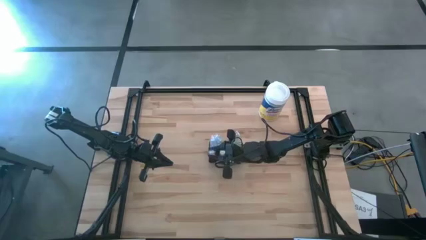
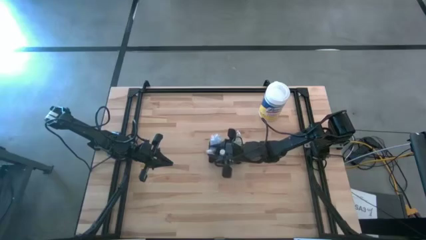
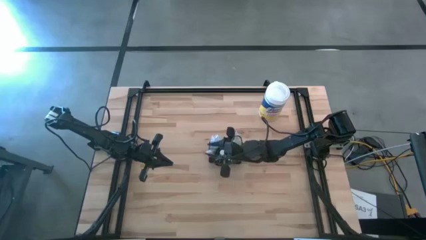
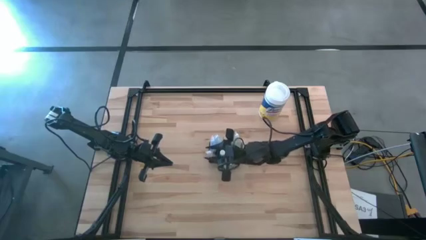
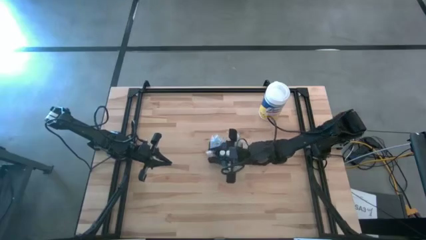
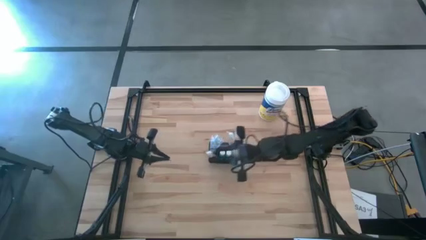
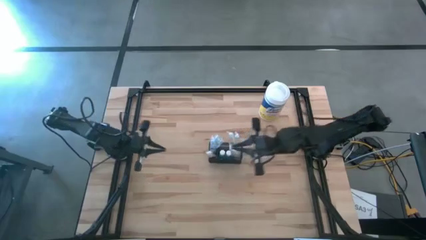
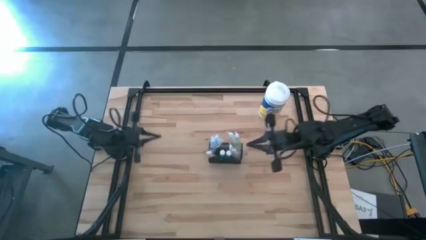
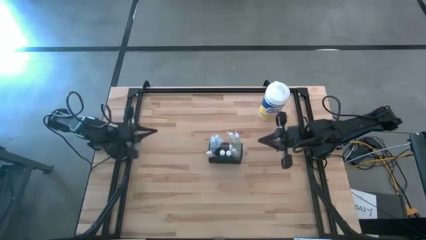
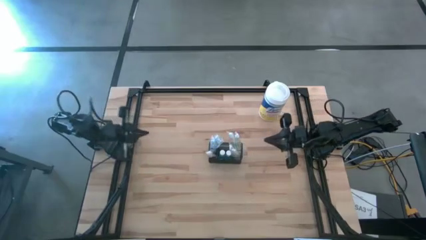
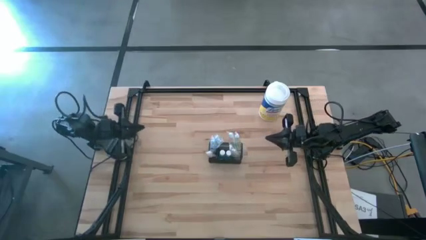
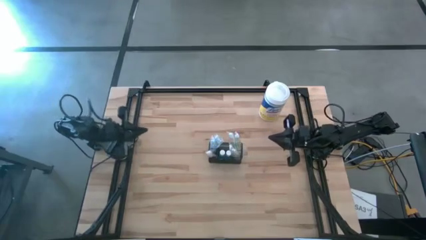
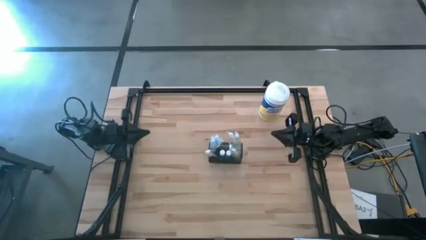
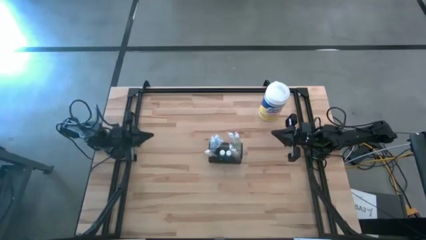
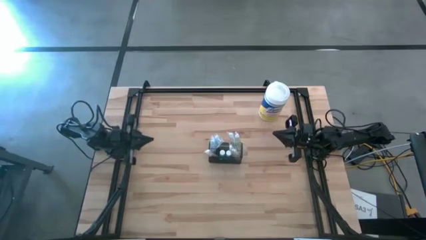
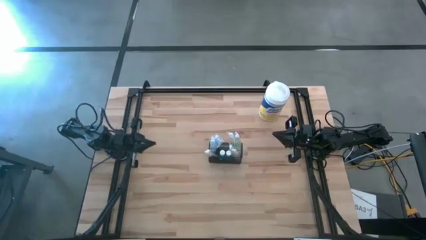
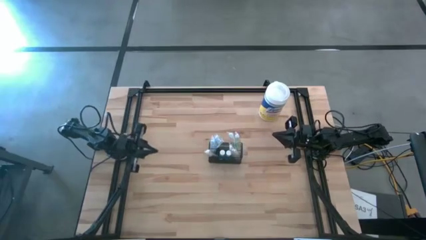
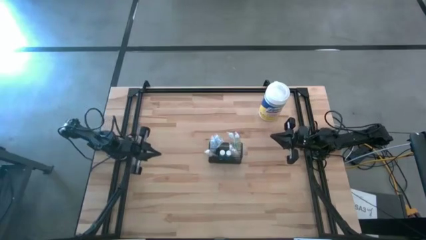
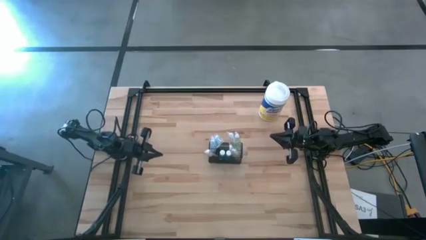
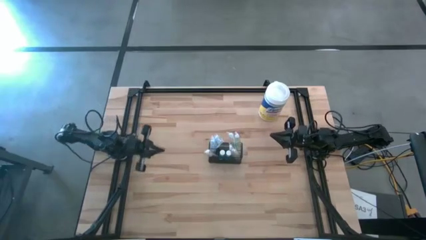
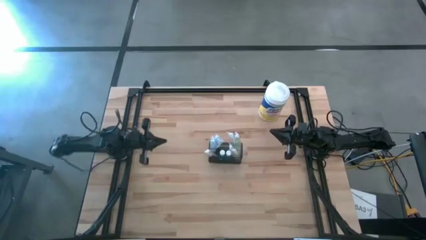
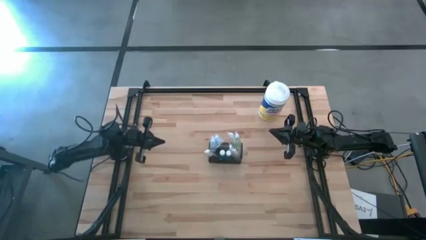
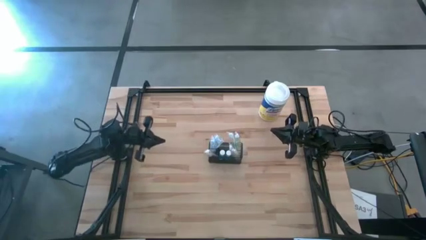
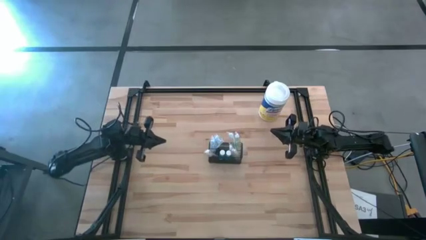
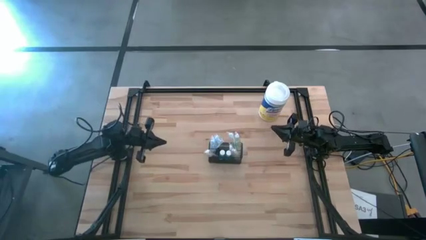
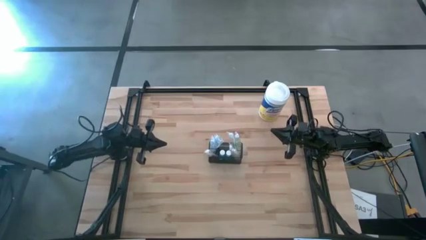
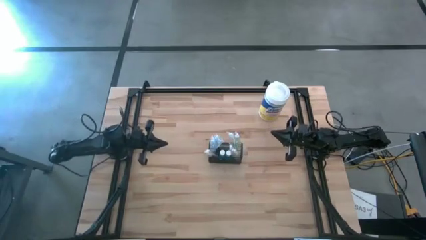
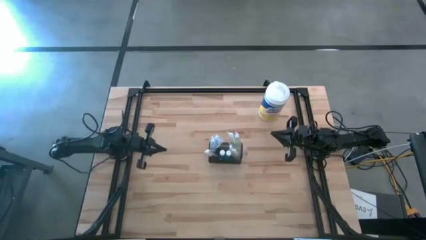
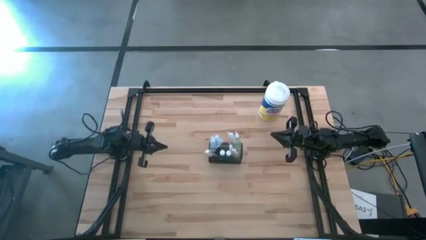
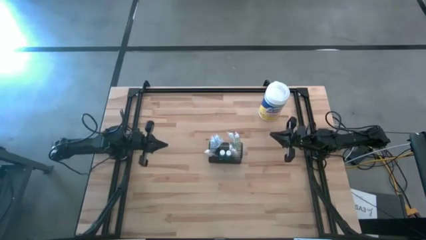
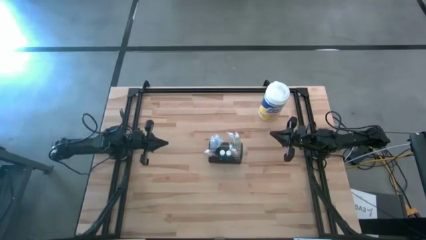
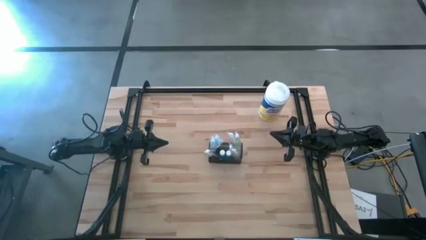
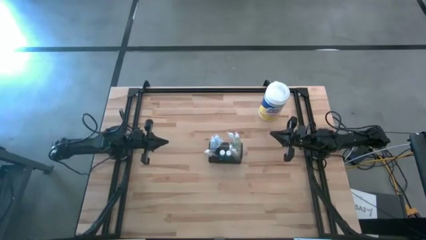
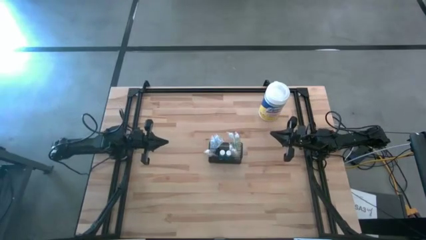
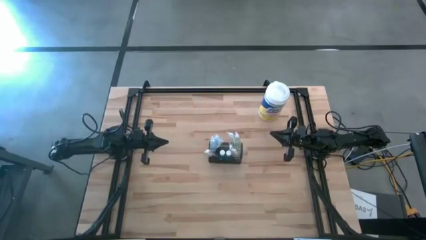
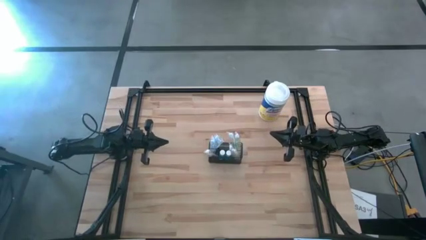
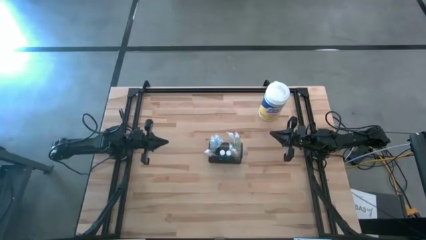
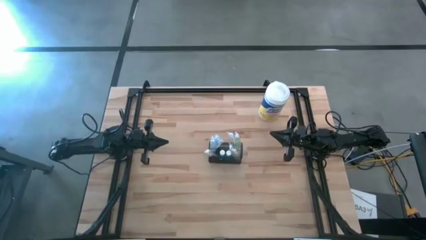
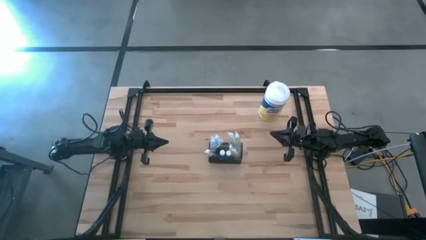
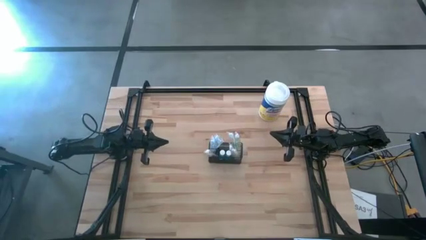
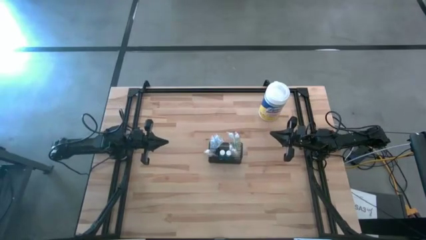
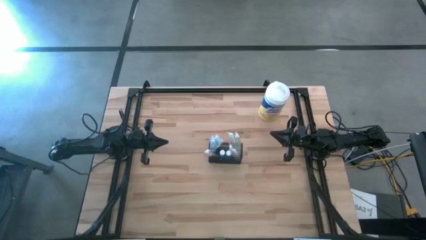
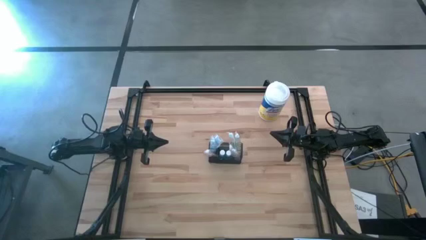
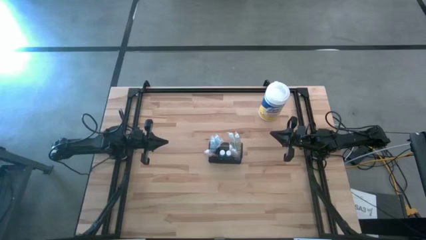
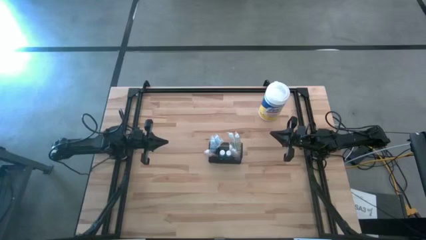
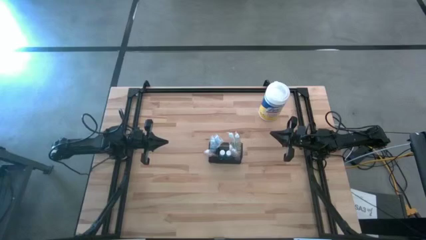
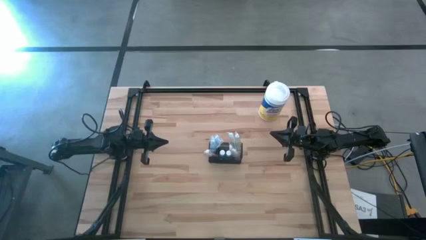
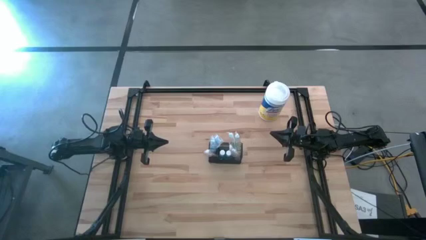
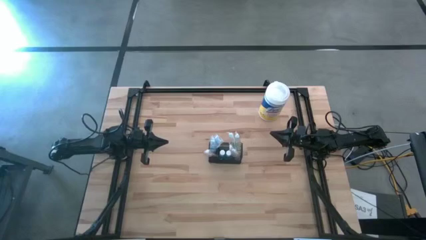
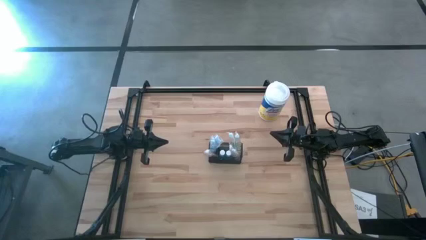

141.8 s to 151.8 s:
Task: Pick & Place toothbrushing station
Return to Home Position
